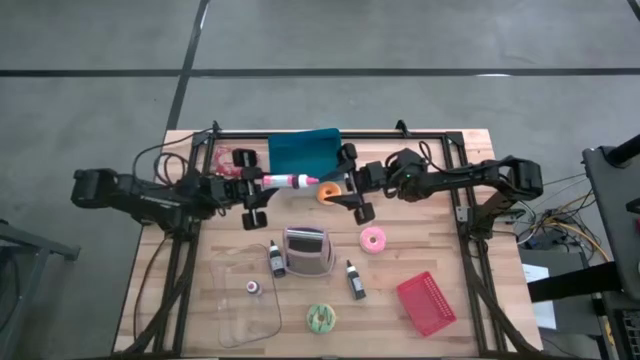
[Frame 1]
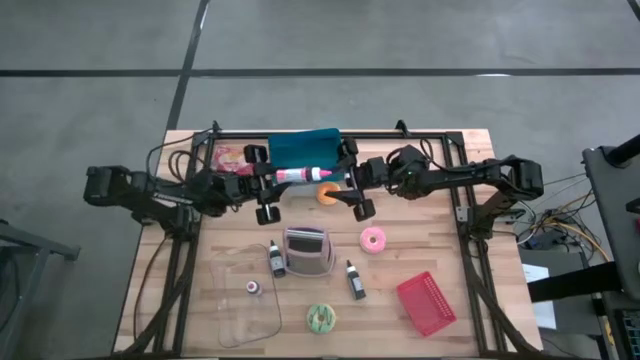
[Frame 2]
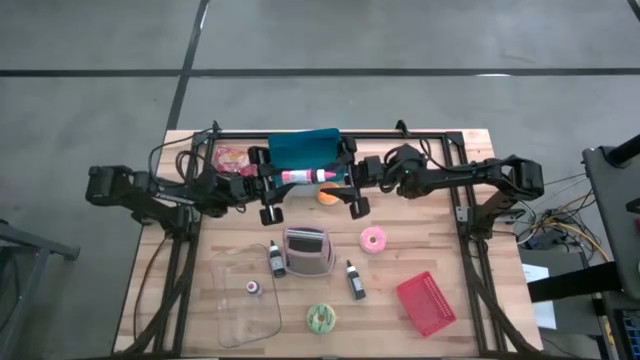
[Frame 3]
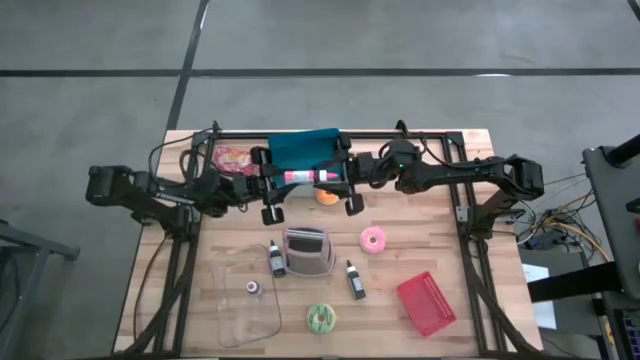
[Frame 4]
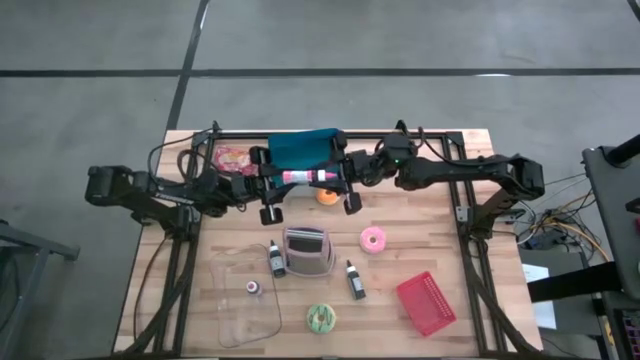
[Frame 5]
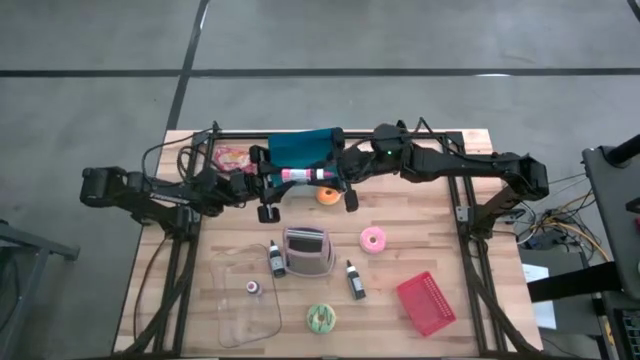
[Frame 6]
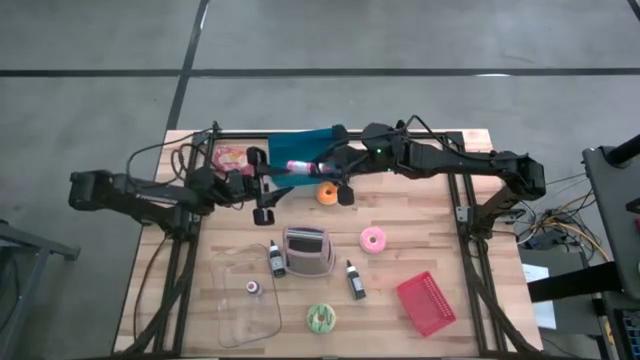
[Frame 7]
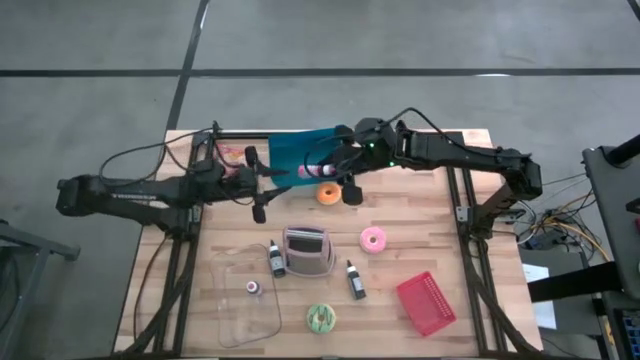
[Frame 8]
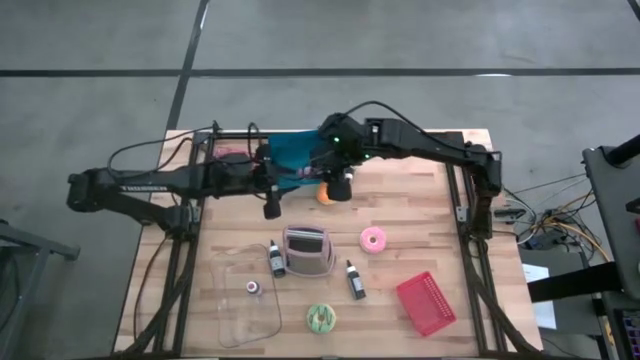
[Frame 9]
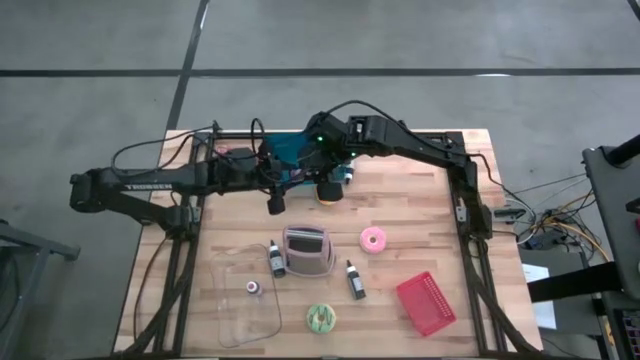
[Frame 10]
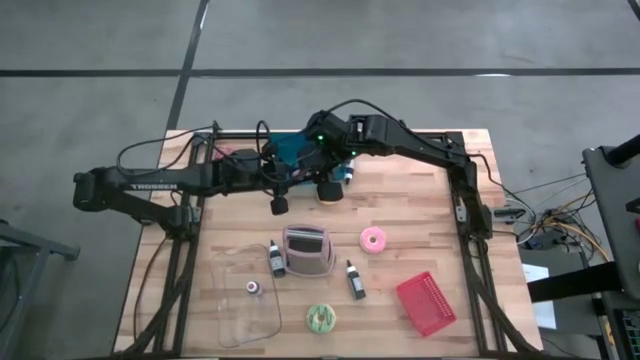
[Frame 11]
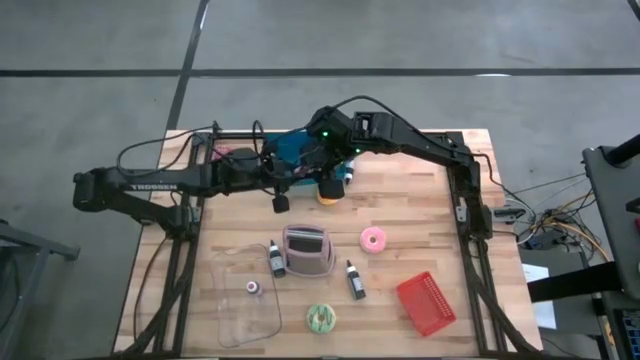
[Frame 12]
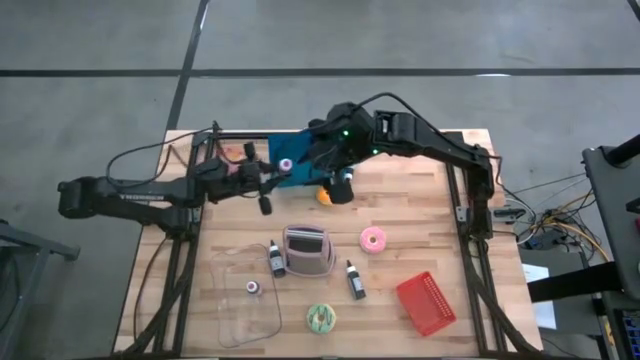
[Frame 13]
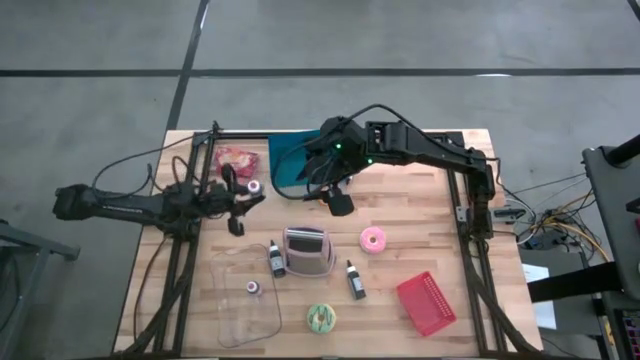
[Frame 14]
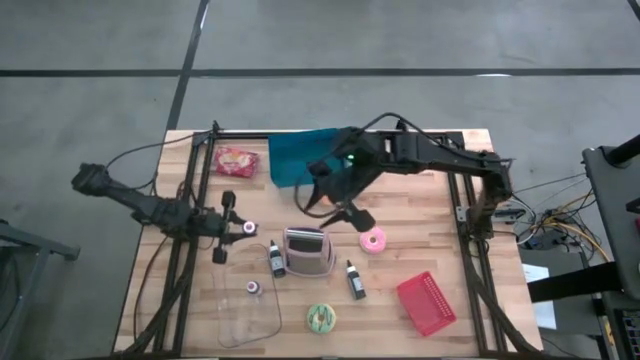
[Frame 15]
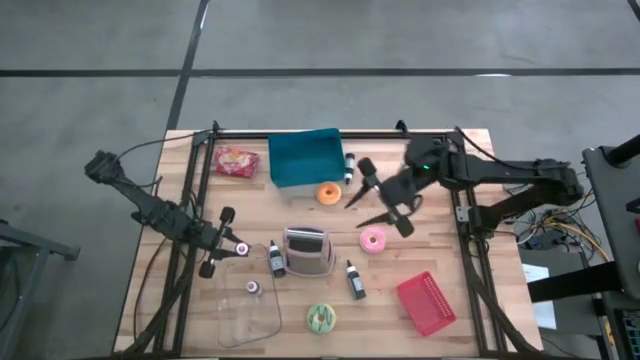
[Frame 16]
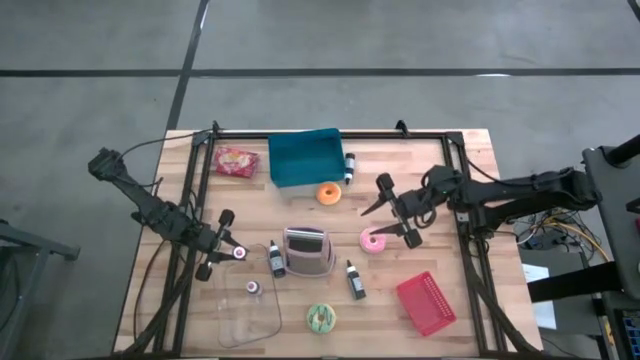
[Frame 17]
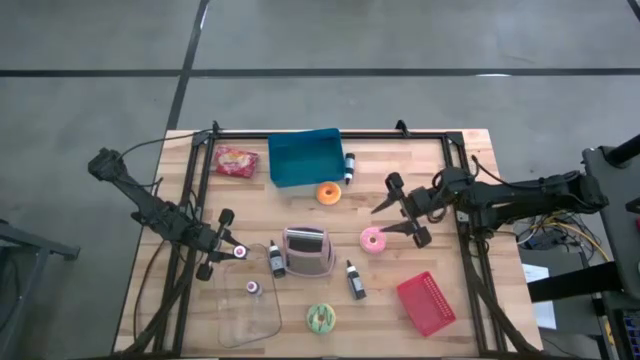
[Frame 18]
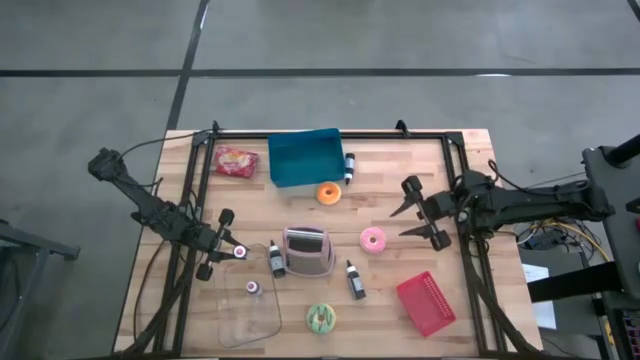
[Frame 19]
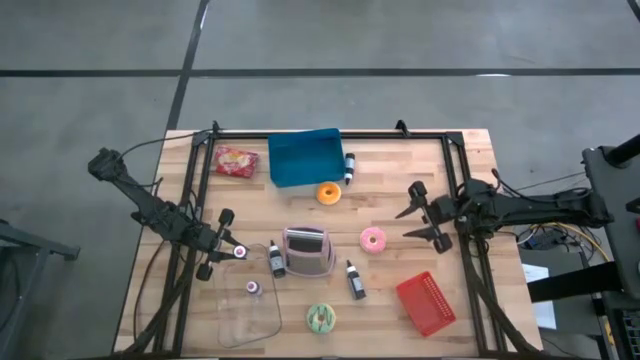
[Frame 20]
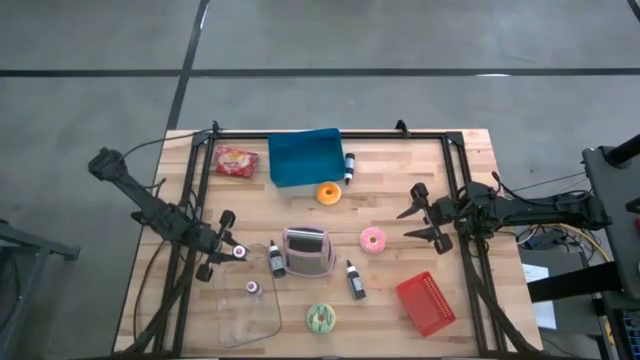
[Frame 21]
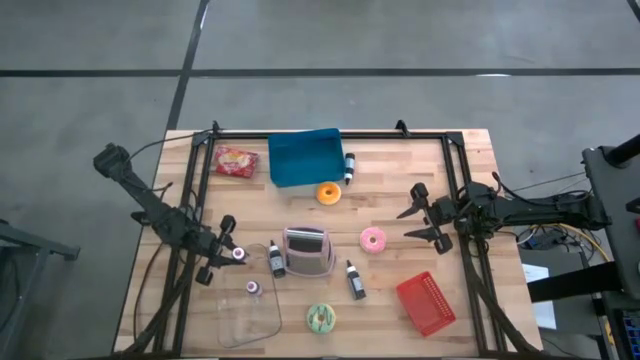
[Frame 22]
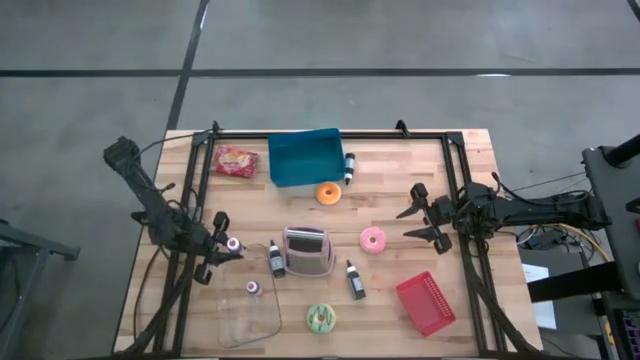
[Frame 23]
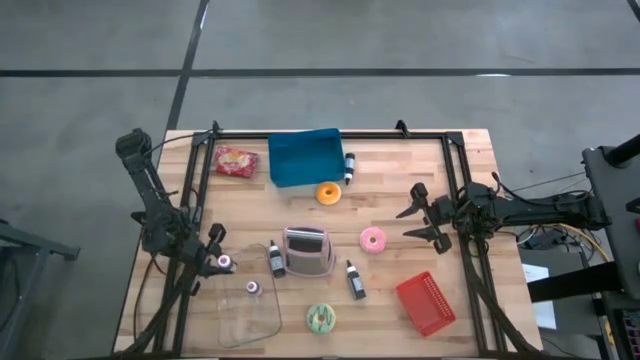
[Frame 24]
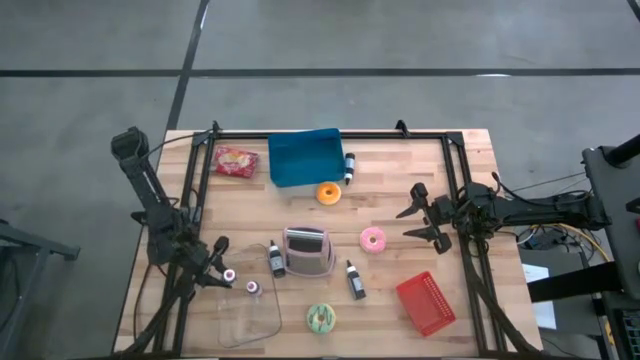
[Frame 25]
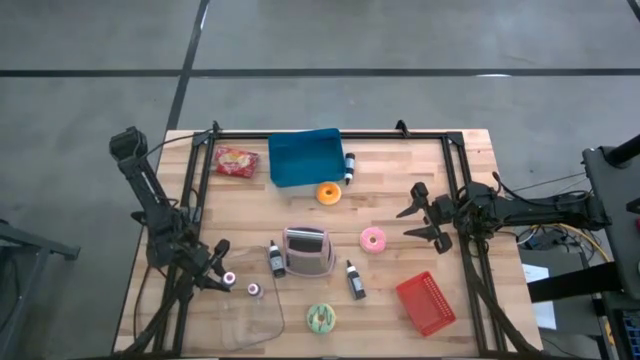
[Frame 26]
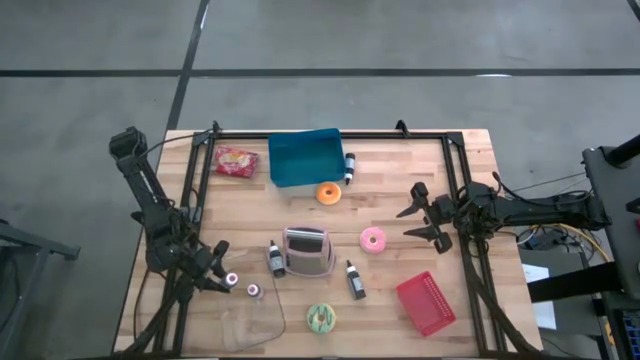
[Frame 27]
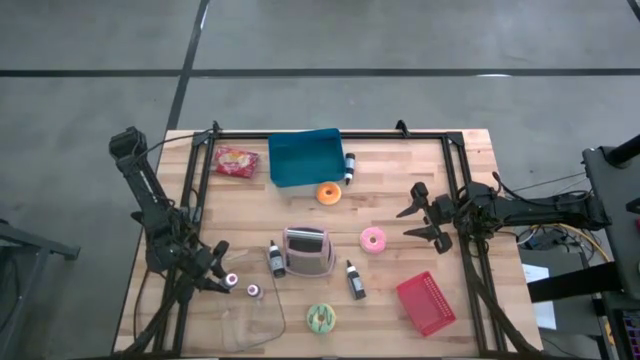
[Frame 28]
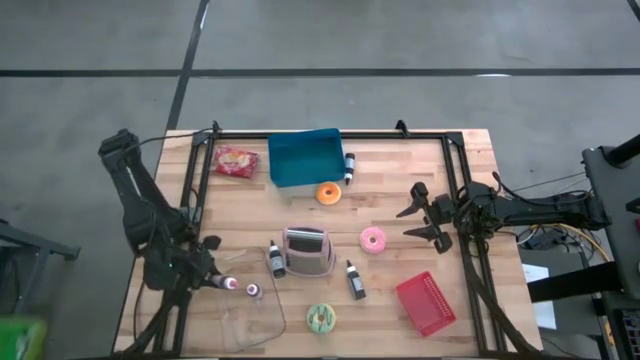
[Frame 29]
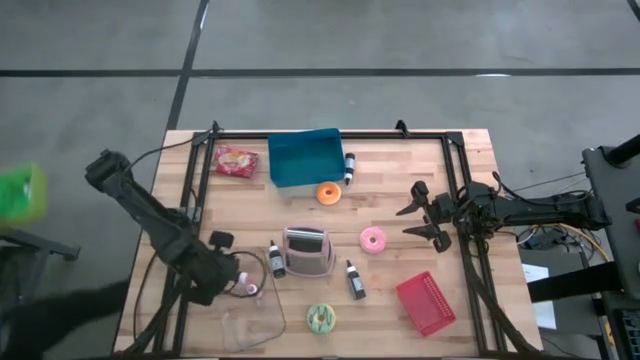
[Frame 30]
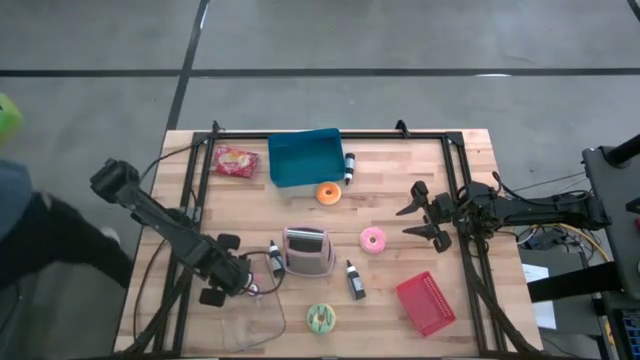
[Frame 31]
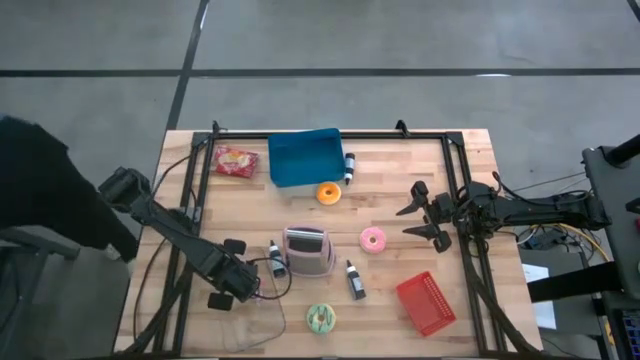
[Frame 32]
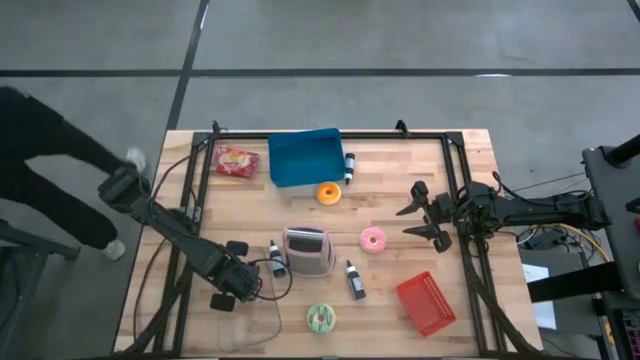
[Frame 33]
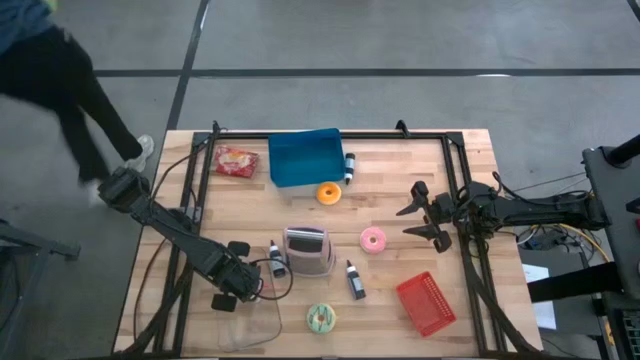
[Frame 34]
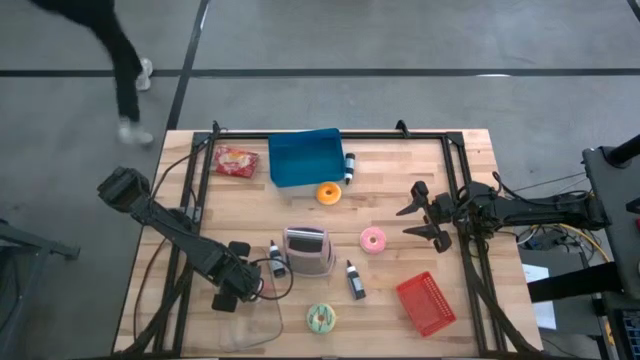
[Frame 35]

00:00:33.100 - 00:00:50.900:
Task: Pick & Place Food Item
Put the pink food coloring bottle into the transparent bin

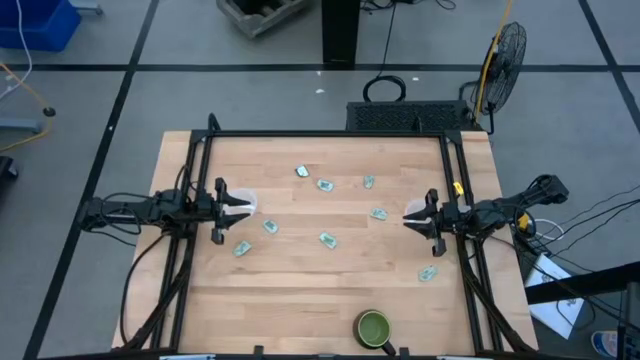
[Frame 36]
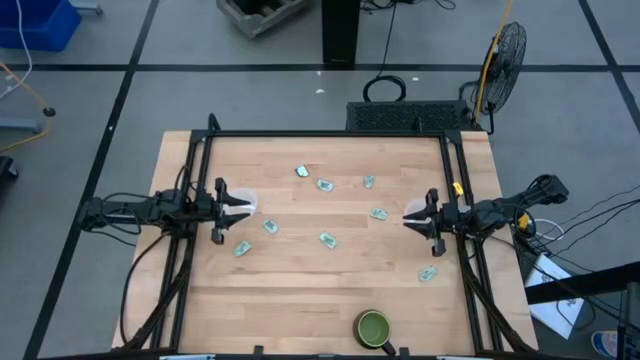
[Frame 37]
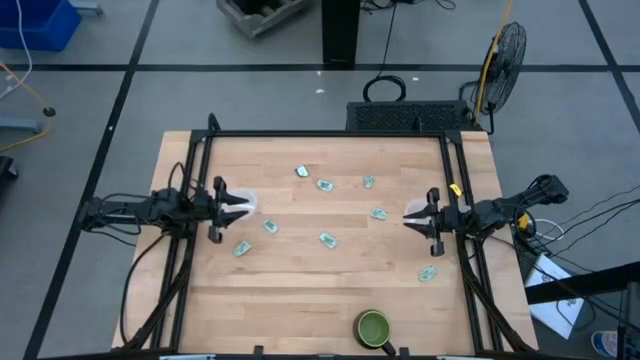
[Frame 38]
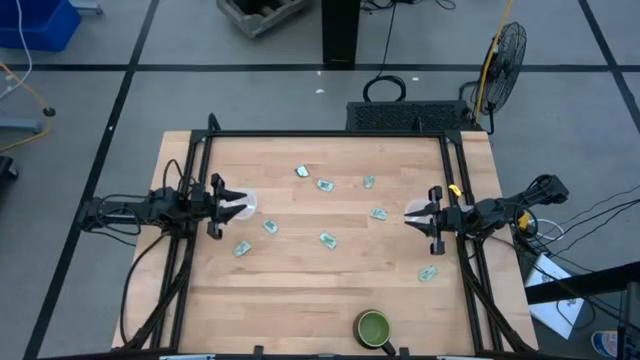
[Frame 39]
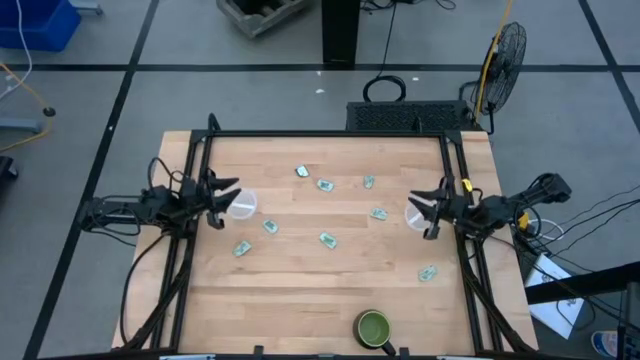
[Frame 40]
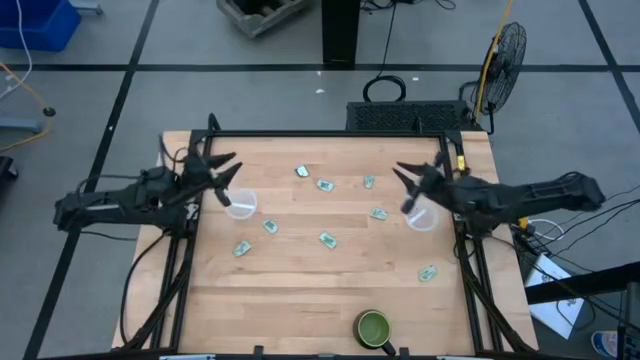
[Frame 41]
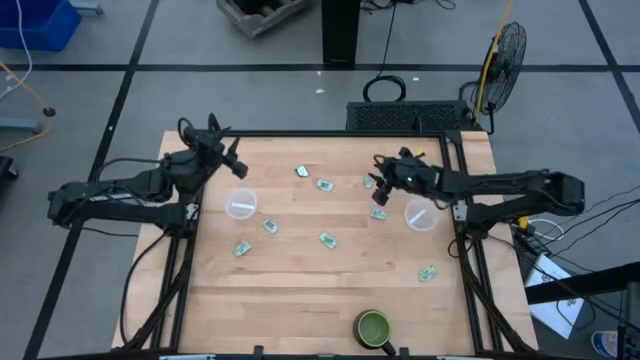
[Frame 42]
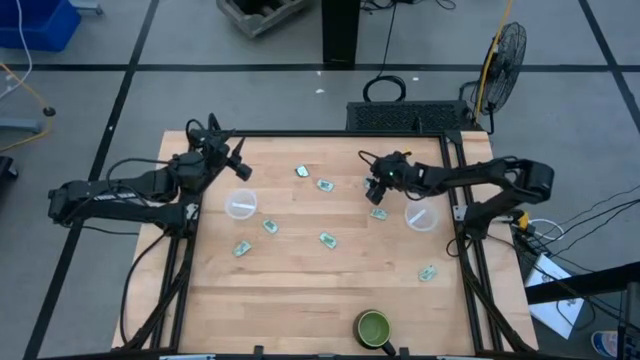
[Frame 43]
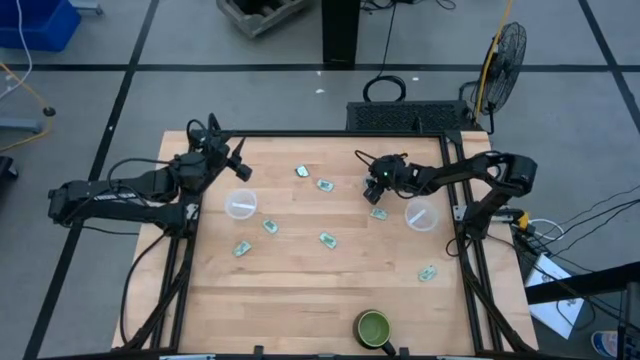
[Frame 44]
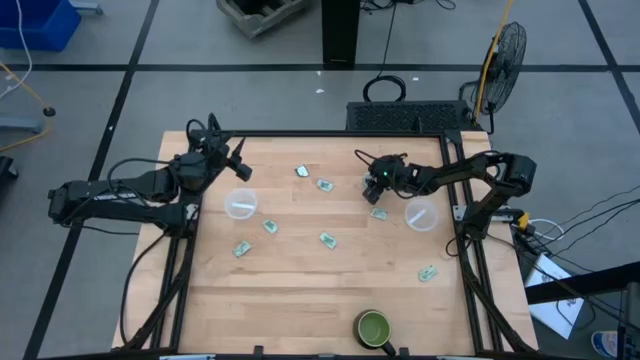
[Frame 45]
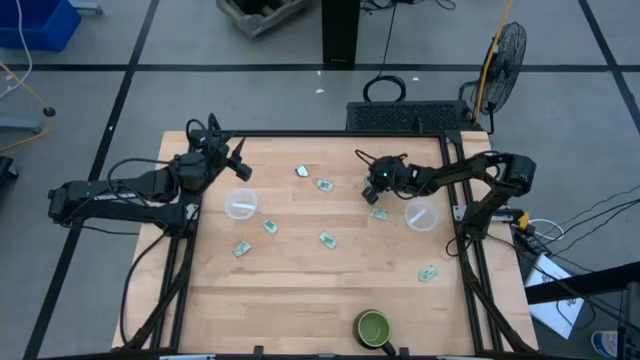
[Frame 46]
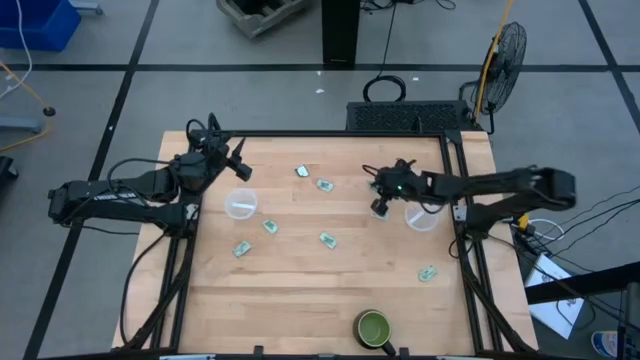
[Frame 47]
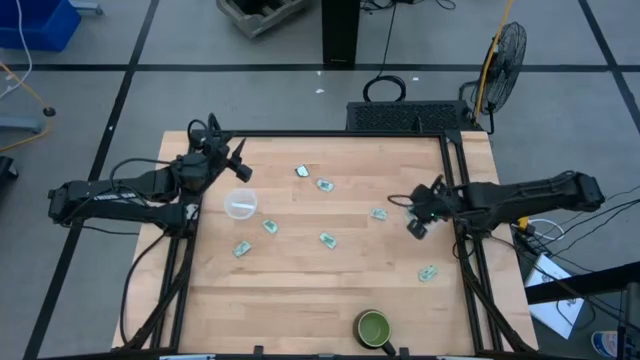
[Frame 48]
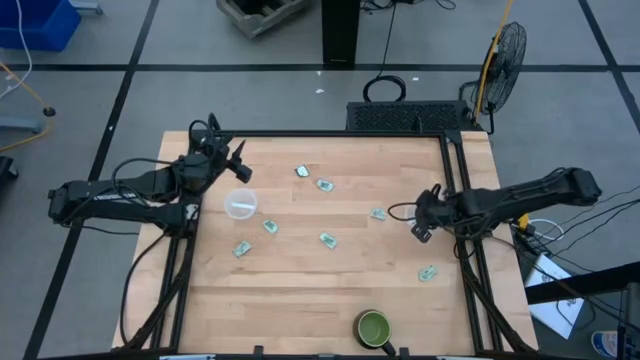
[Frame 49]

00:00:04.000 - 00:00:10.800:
Task: Pick and place Stevia / Truvia into bins
Put the stevia packet into the right transparent container
